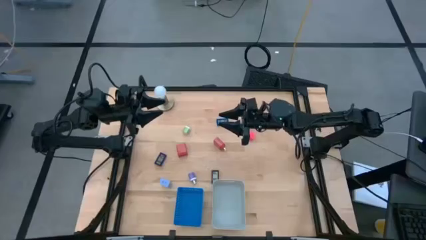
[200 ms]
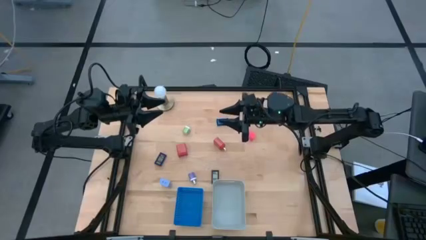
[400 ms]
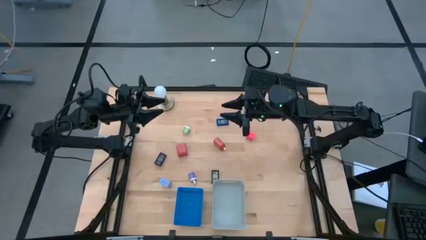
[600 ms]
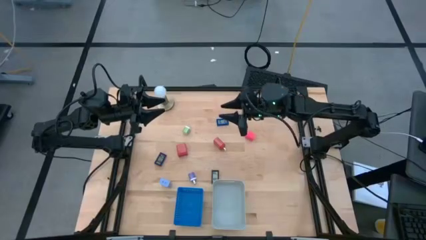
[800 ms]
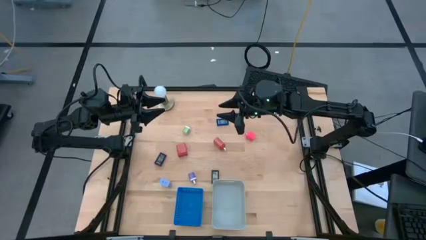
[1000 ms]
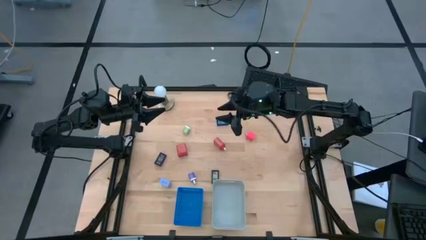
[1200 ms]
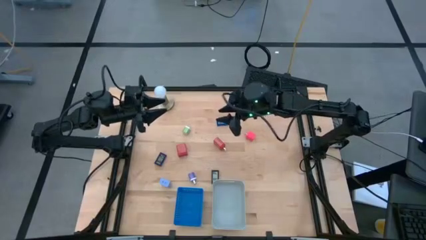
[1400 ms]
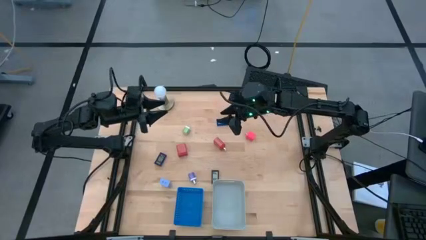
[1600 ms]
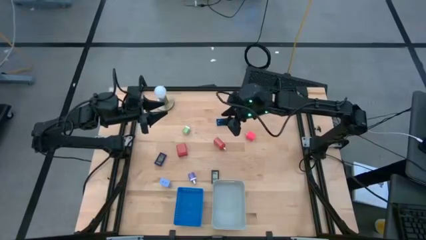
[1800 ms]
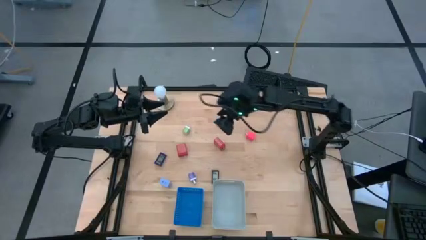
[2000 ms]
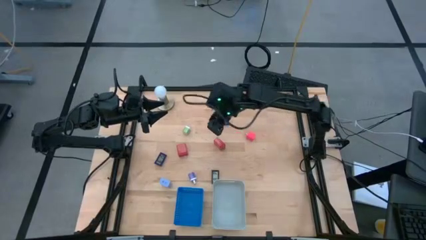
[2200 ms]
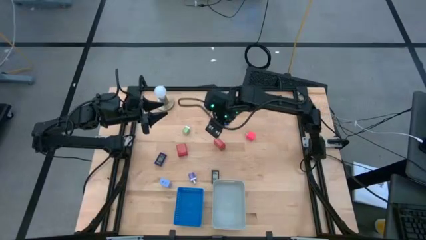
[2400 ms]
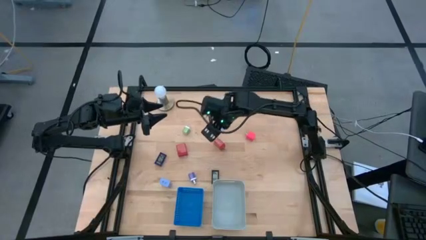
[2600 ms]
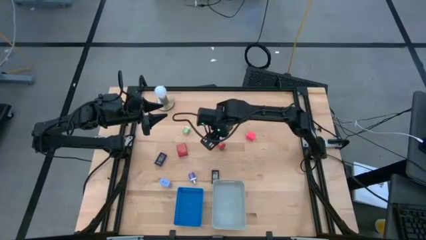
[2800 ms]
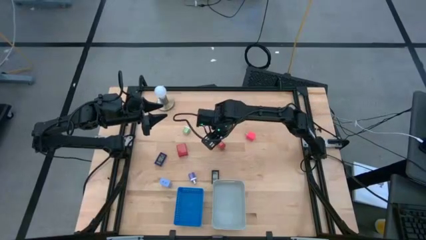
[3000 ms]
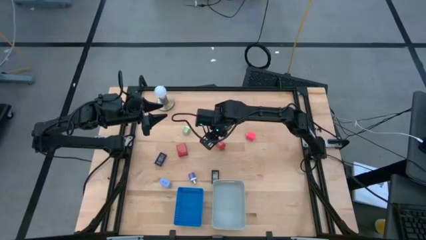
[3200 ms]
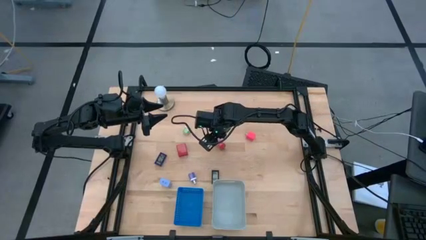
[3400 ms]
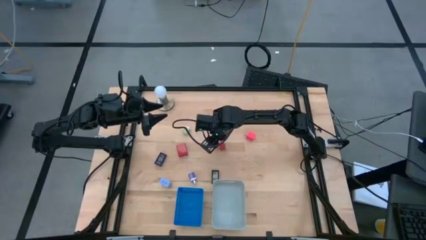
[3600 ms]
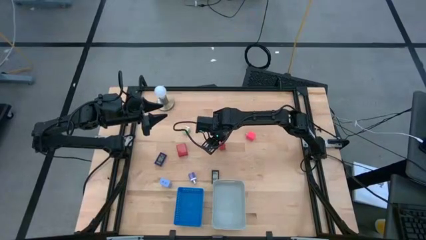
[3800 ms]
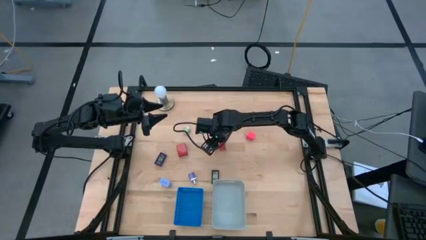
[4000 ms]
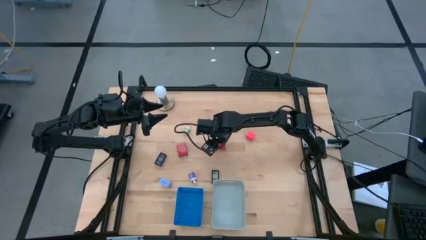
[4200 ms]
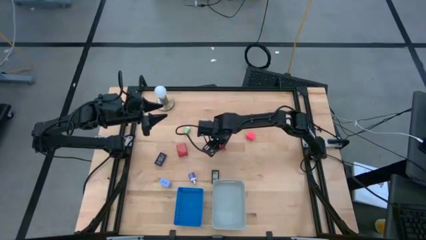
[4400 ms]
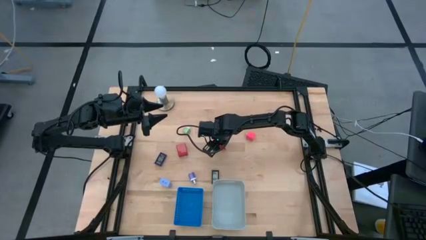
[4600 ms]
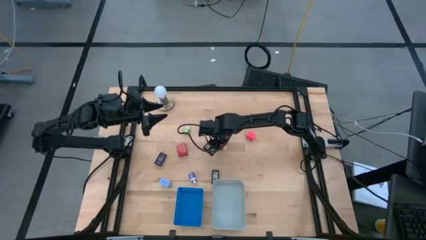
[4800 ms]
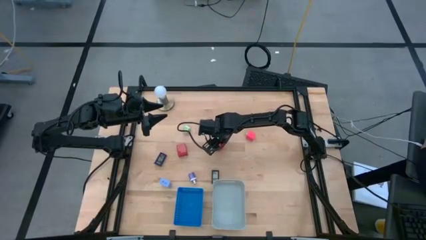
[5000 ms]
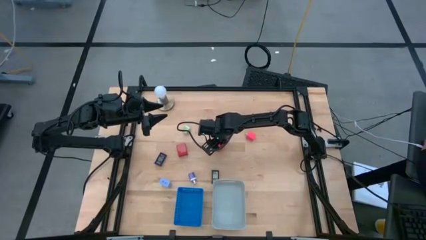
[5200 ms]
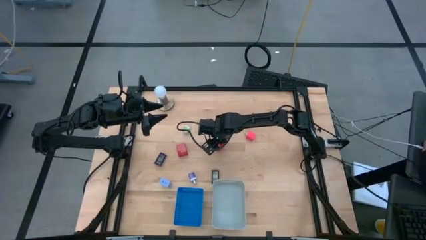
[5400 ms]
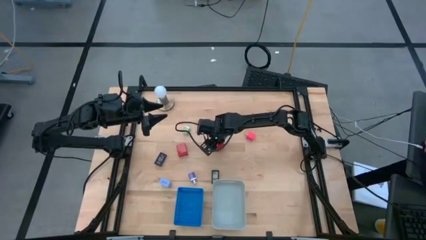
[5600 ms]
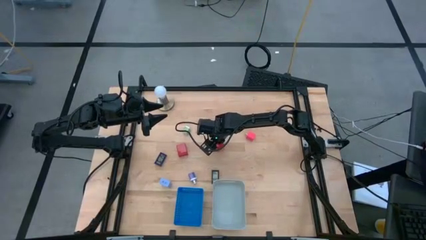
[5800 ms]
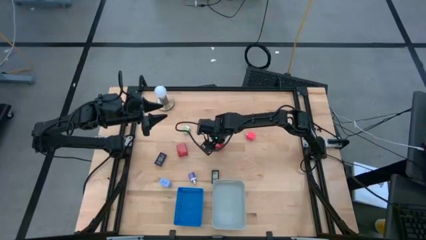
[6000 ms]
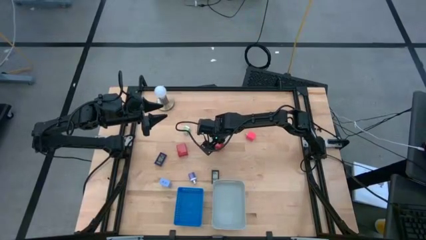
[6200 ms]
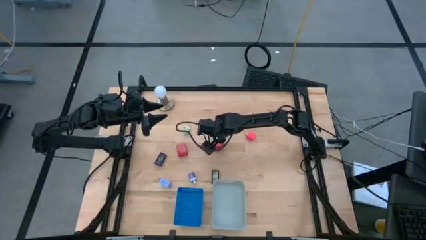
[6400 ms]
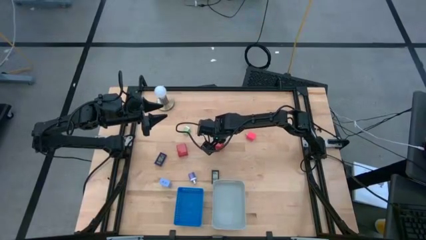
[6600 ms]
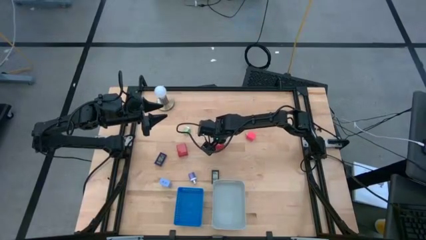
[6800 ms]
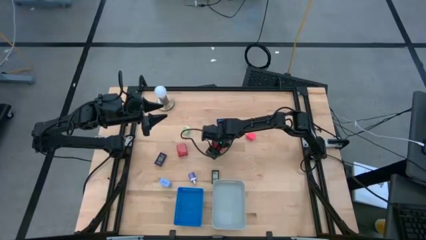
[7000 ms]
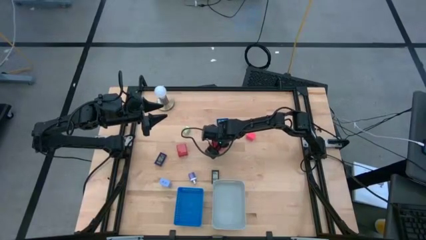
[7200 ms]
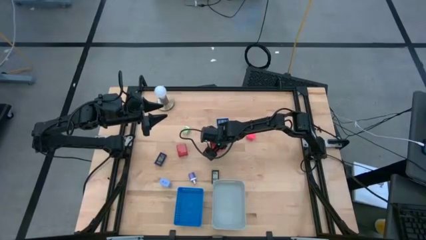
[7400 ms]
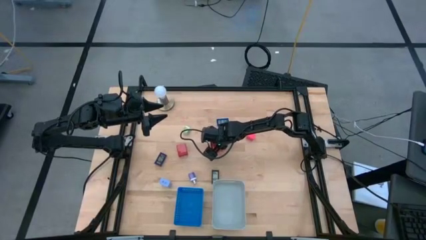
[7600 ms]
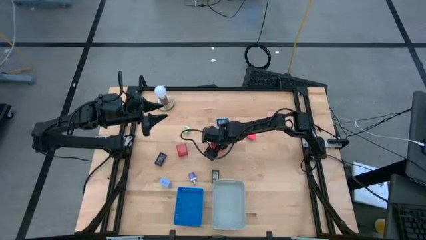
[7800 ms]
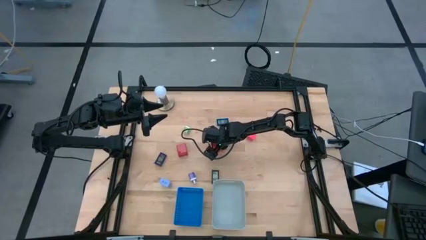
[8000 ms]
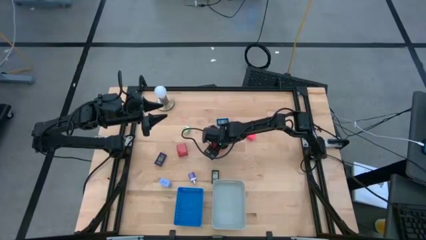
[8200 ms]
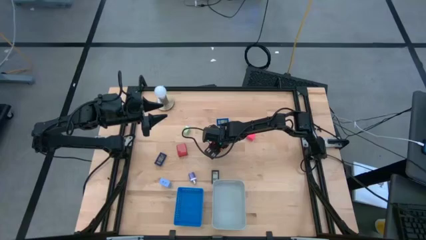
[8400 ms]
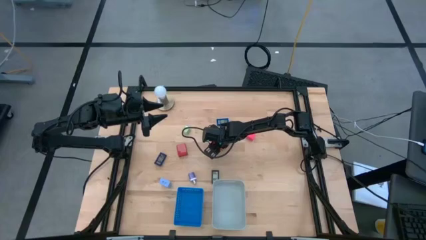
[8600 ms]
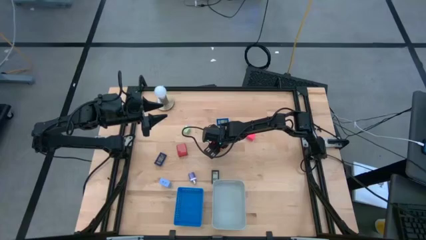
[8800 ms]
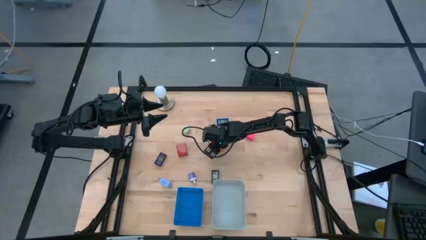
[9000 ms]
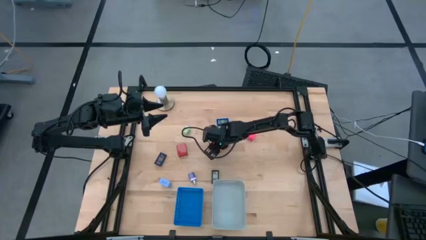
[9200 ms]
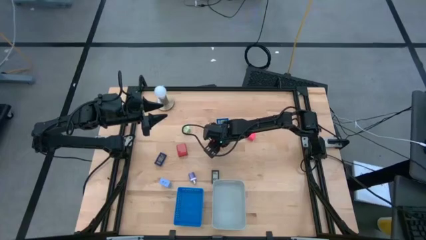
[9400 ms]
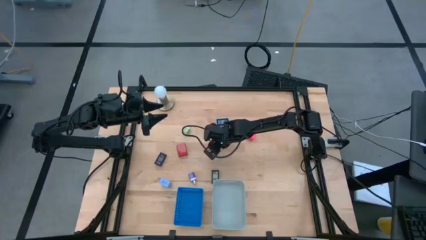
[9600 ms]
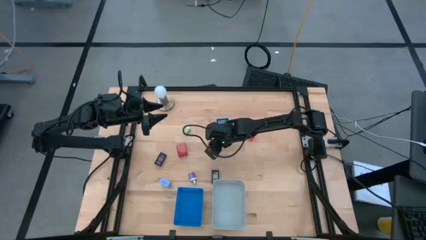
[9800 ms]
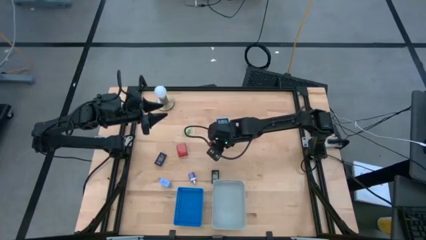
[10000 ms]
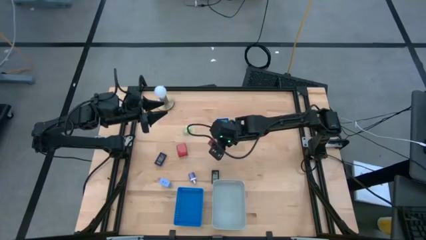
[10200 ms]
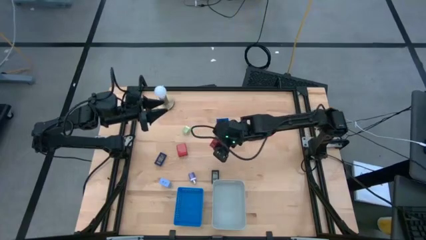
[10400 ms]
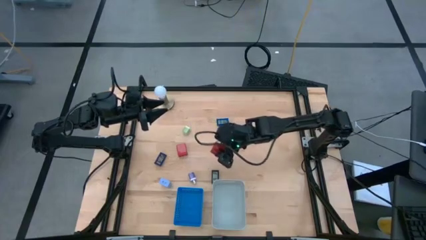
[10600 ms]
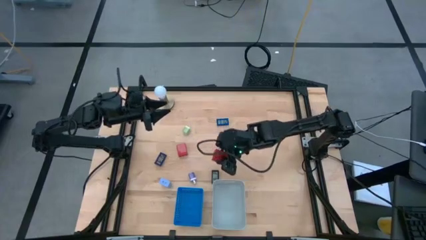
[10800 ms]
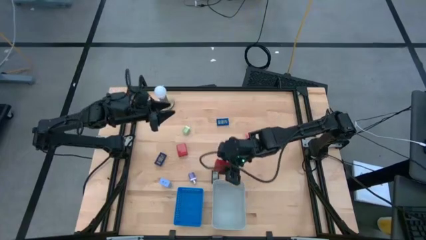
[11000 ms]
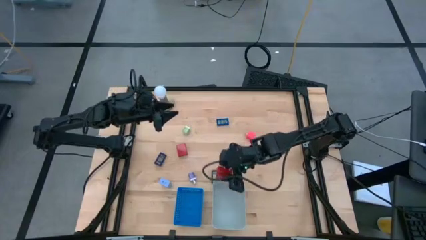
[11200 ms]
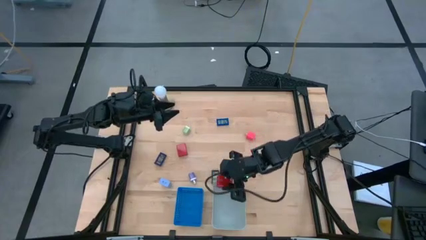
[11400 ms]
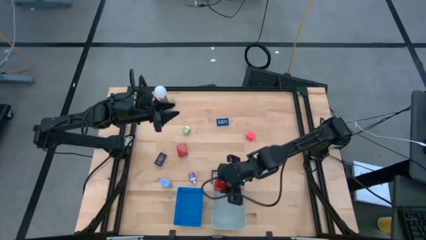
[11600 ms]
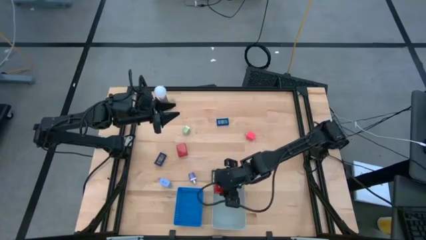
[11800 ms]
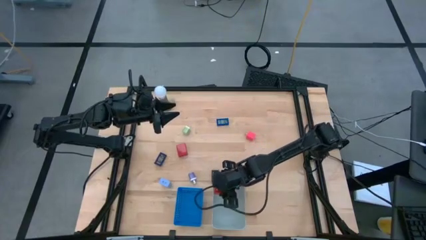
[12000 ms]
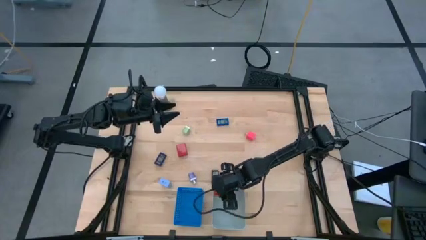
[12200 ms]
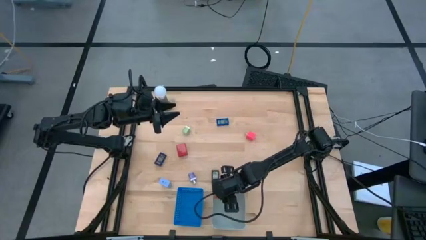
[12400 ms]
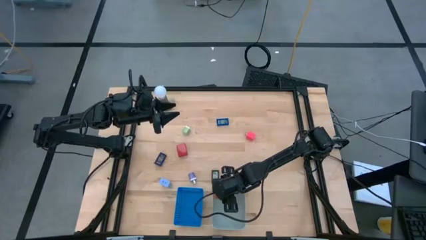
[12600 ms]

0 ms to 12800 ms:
Task: Pick & Place Office items
Put the right red charger adapter into the gray bin
